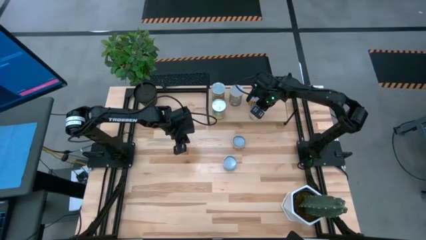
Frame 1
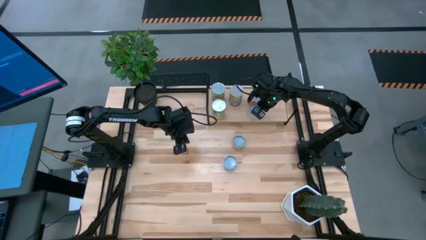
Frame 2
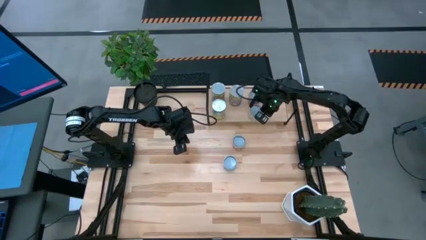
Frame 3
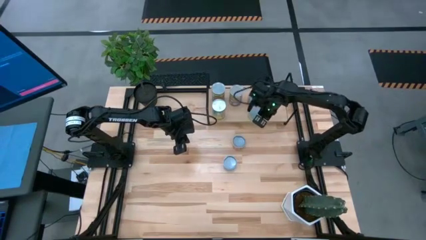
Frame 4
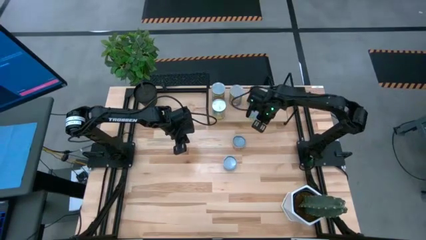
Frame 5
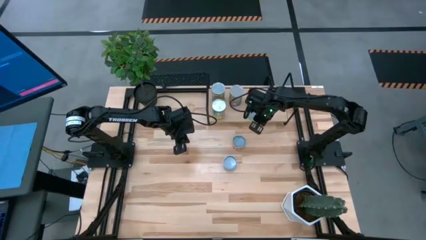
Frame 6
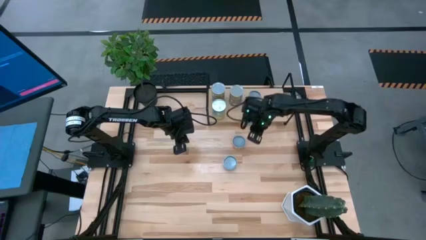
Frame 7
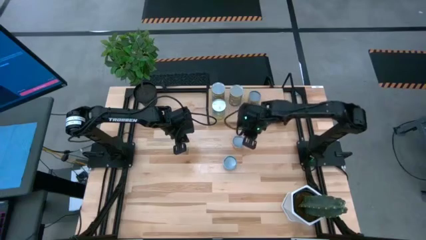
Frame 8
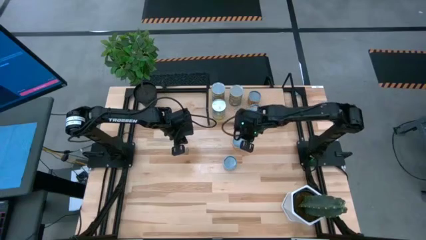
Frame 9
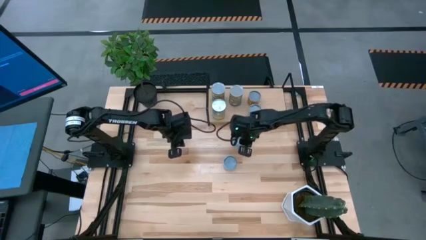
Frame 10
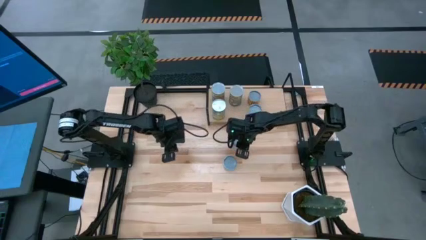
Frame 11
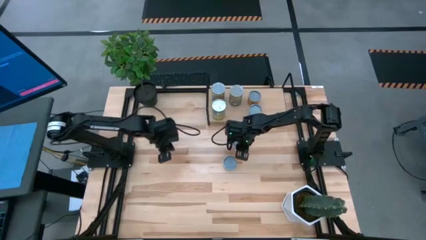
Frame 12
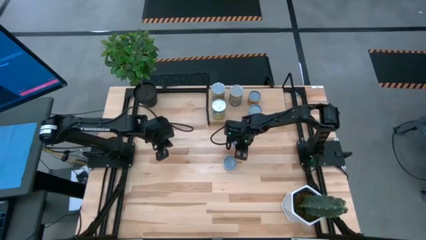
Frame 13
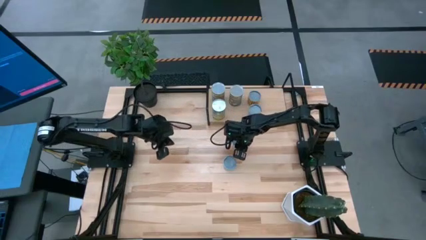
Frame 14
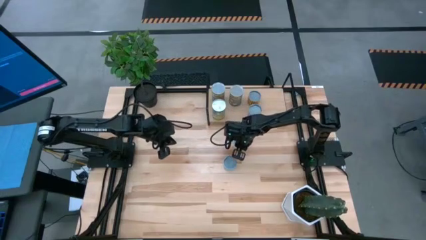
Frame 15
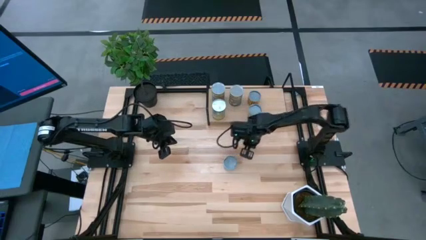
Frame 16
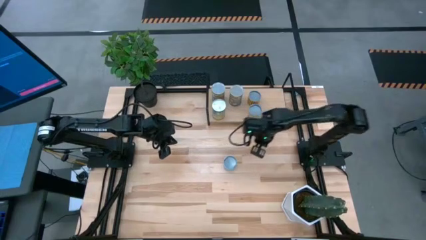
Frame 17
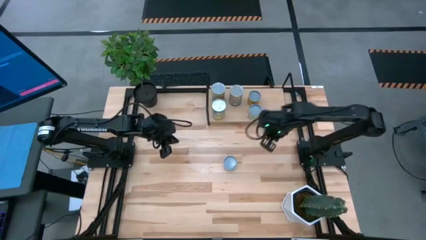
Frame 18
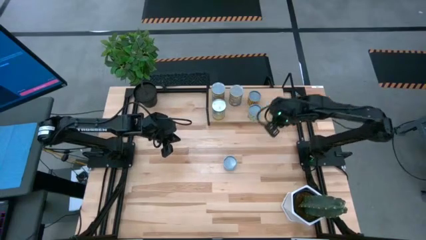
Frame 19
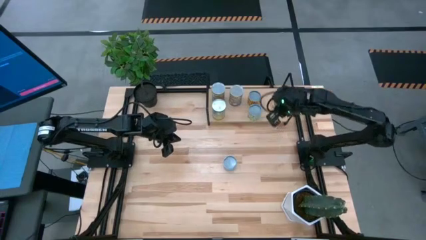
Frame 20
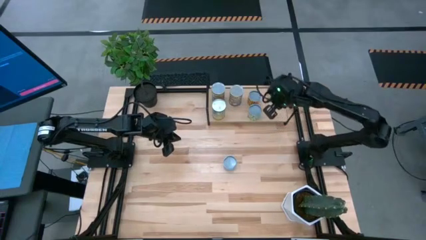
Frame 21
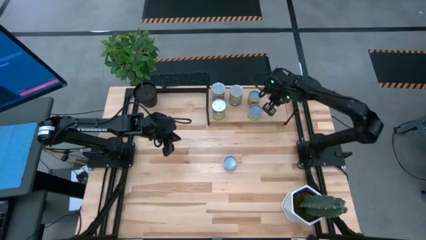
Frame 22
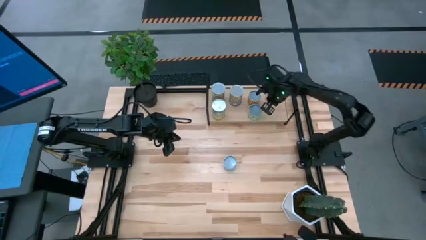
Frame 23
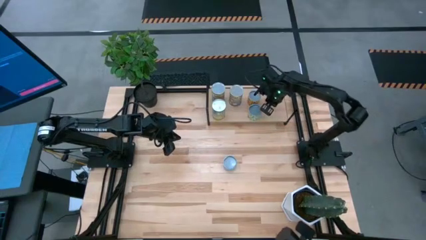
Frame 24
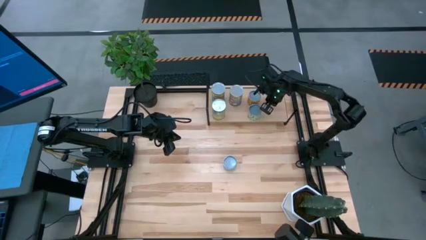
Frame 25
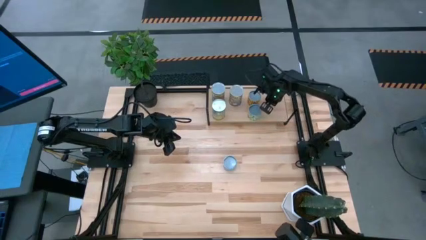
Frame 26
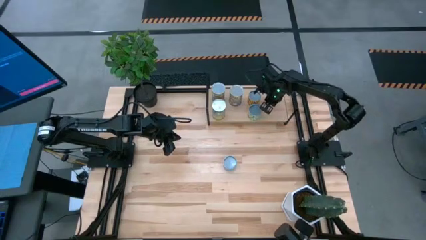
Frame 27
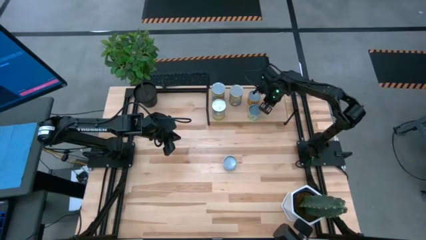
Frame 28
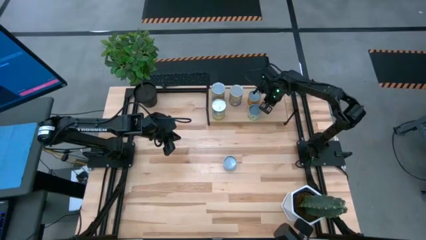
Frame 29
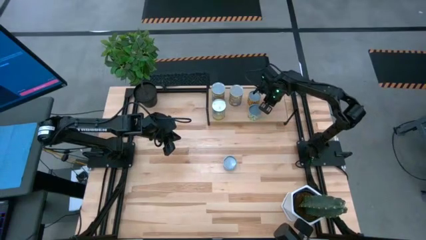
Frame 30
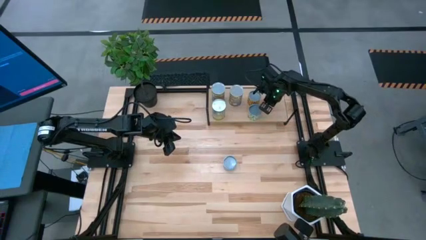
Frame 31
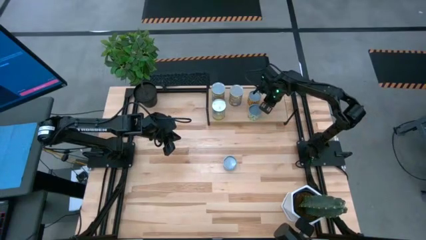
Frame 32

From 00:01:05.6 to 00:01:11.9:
Task: Pick and place cans onto a shelf
Put the canned mushrooms on the shelf

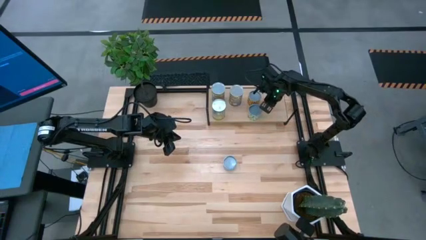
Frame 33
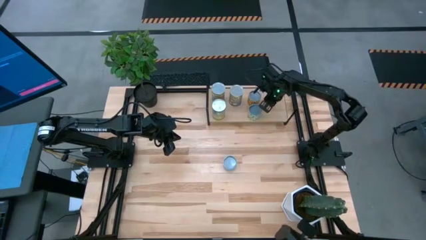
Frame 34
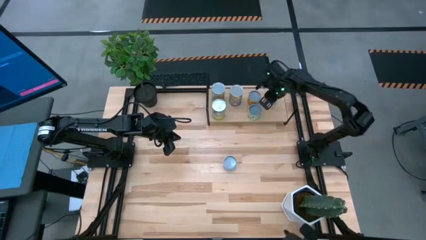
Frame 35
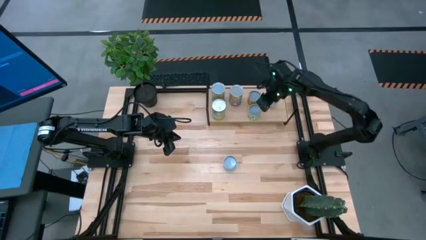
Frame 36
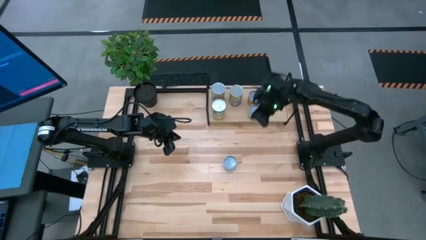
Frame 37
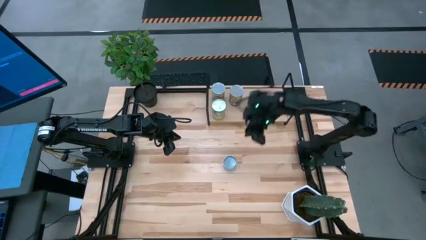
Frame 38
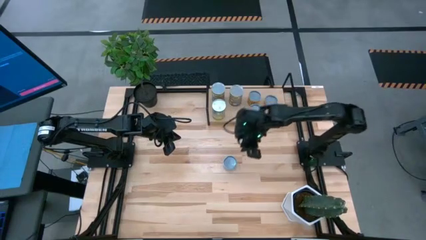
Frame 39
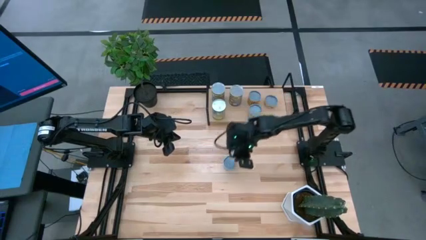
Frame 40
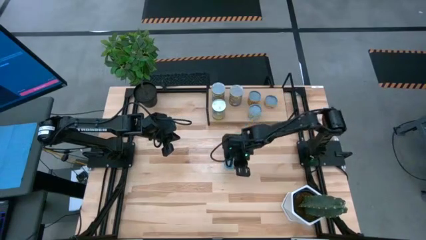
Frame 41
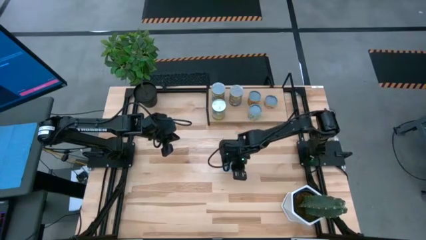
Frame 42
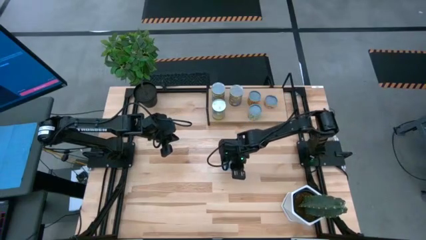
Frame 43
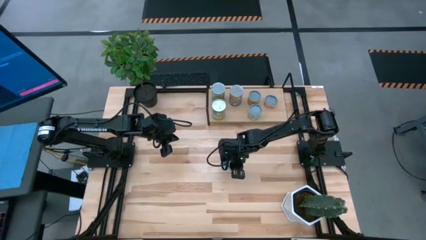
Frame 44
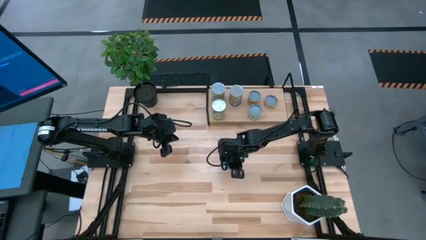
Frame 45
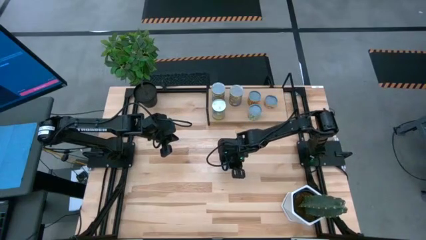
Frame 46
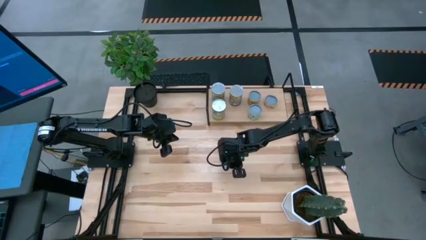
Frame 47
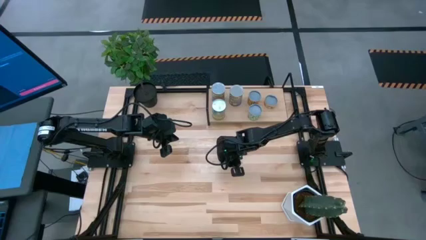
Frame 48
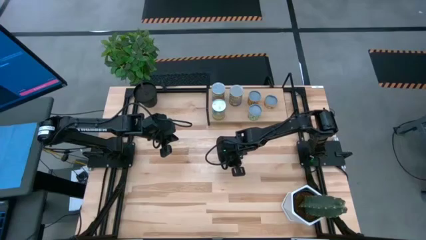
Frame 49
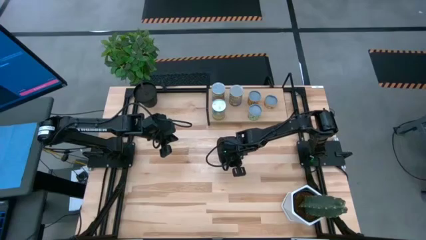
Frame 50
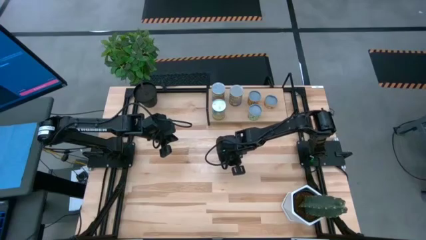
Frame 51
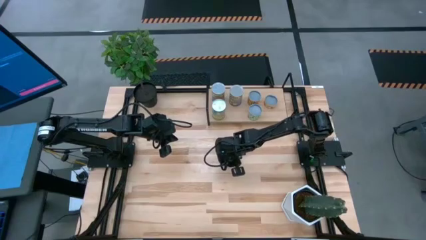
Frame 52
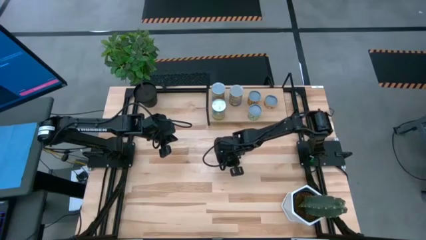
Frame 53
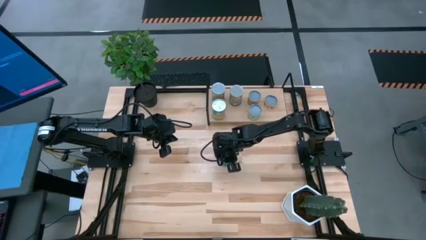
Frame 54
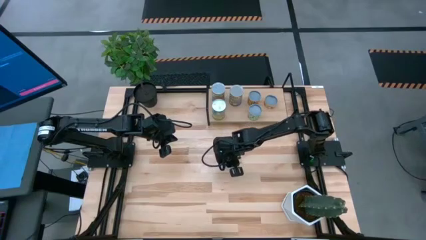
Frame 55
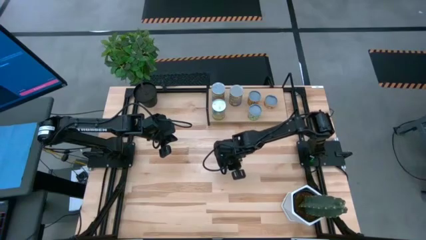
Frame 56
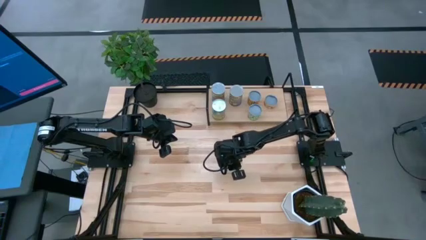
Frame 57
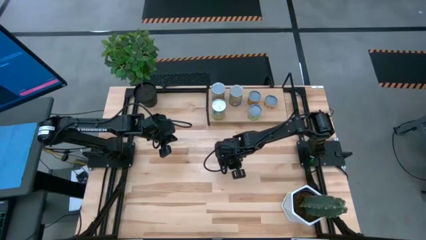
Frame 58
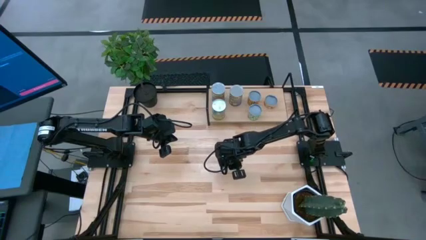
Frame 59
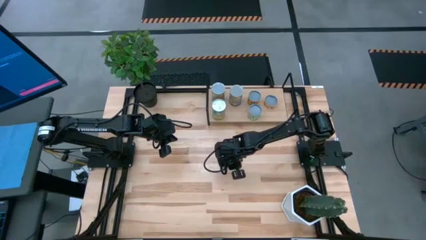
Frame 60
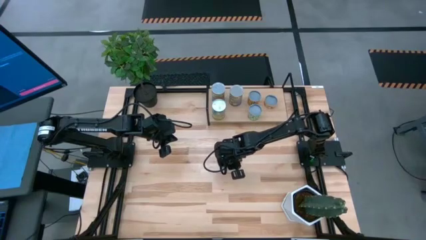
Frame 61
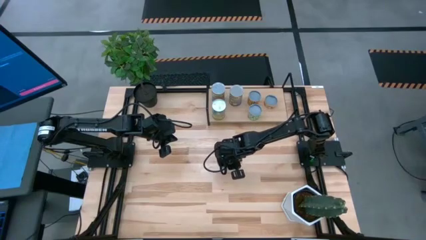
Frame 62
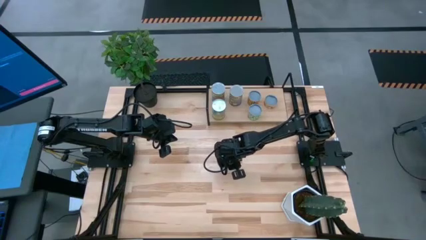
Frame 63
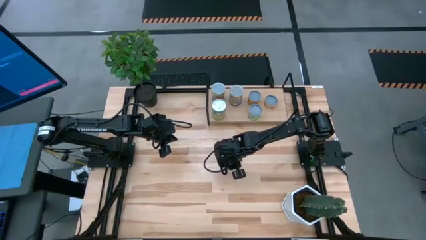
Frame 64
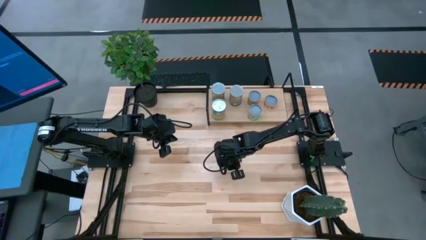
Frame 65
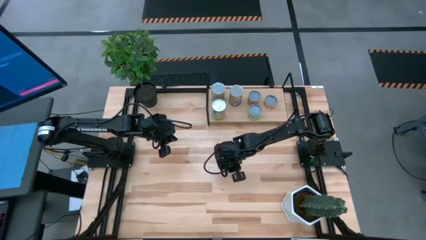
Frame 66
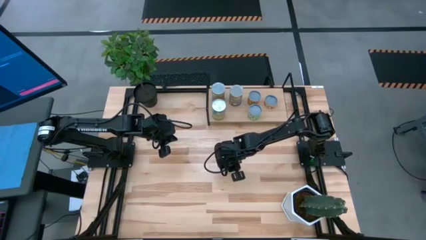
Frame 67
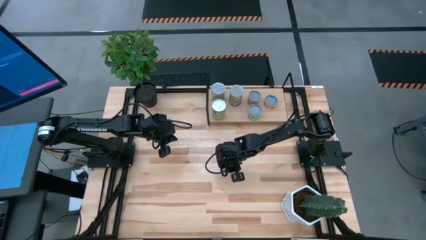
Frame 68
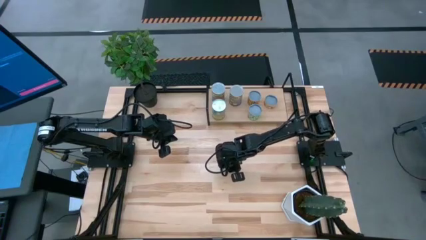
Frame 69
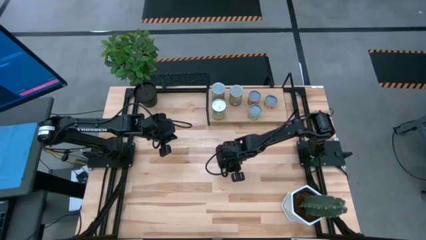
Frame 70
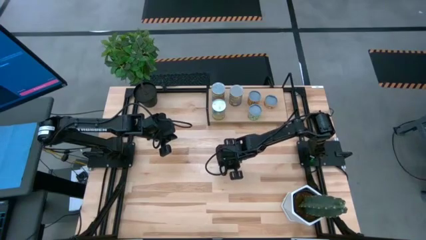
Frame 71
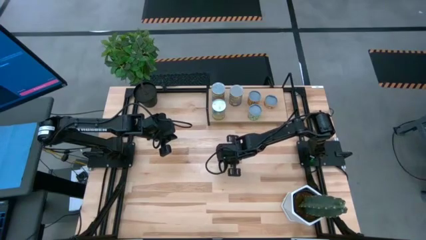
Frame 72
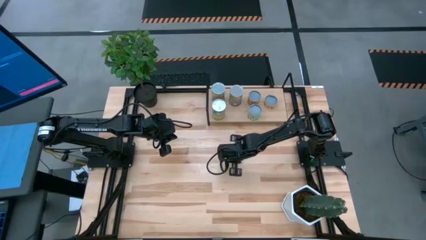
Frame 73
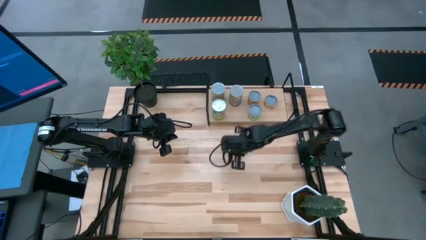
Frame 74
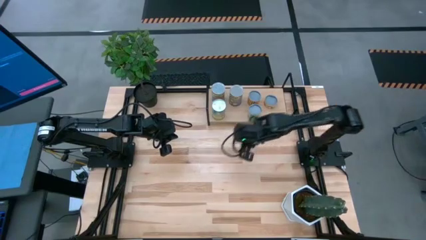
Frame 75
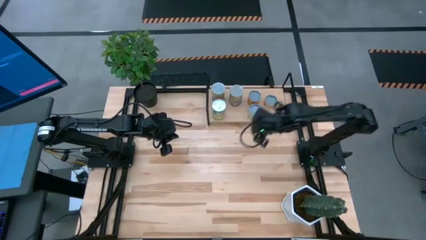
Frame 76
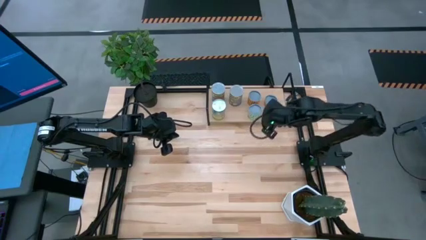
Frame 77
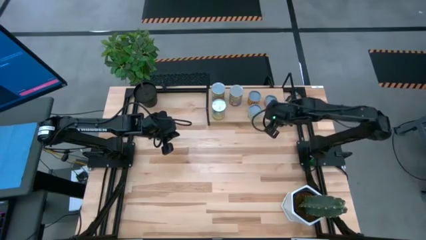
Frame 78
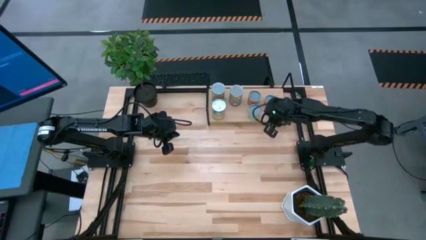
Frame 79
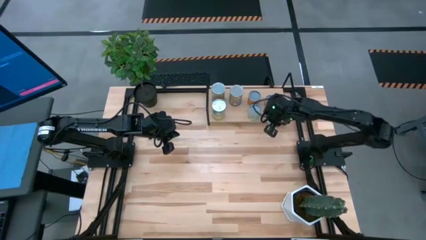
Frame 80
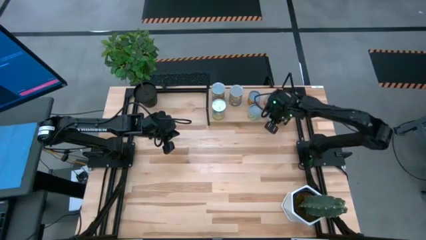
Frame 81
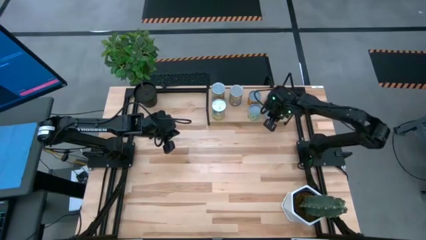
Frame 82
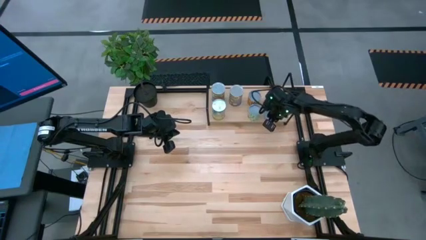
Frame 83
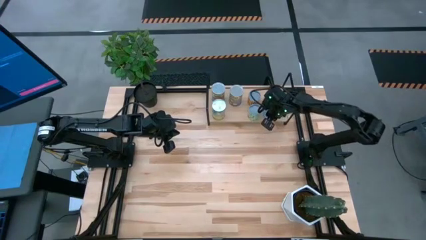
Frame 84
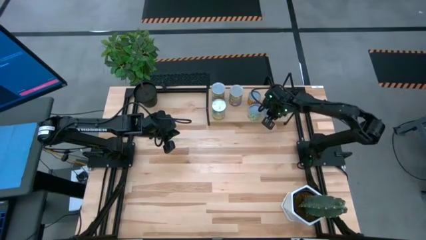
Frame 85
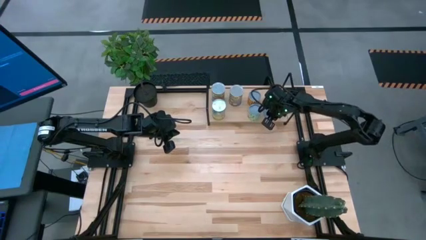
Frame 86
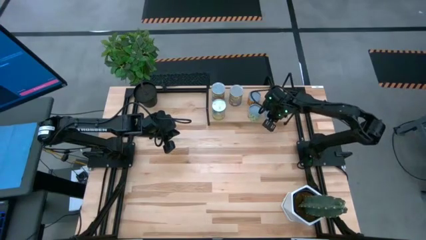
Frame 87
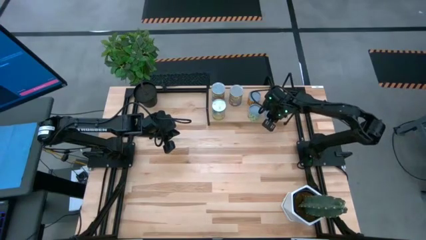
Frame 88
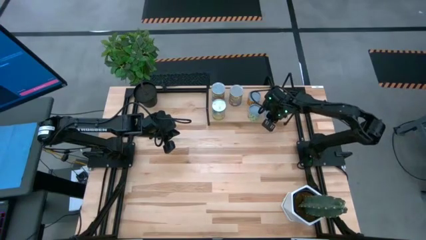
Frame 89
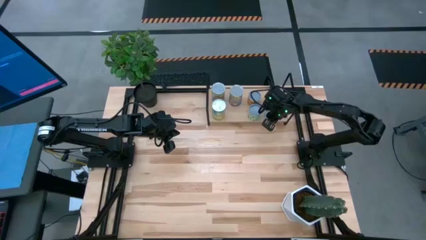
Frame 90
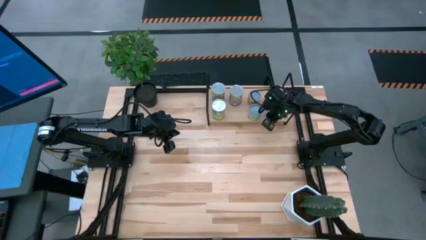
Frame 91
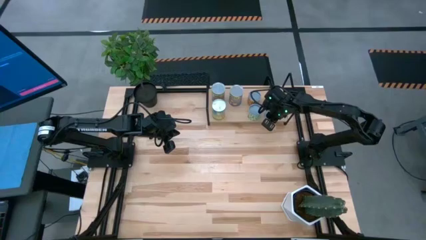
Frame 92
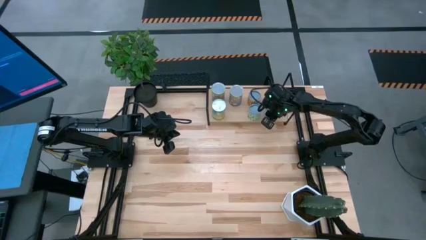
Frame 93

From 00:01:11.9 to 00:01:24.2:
Put the canned tuna on the shelf
